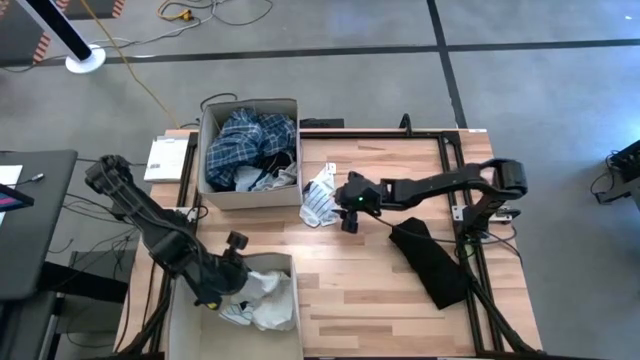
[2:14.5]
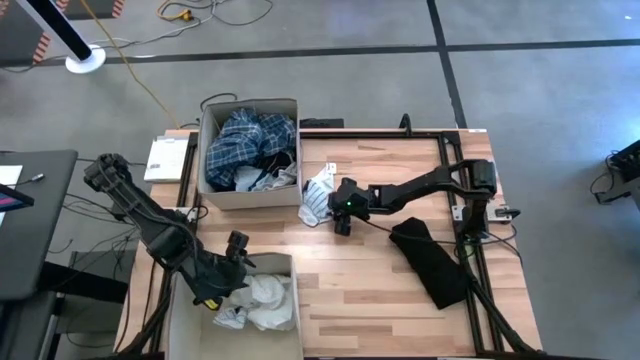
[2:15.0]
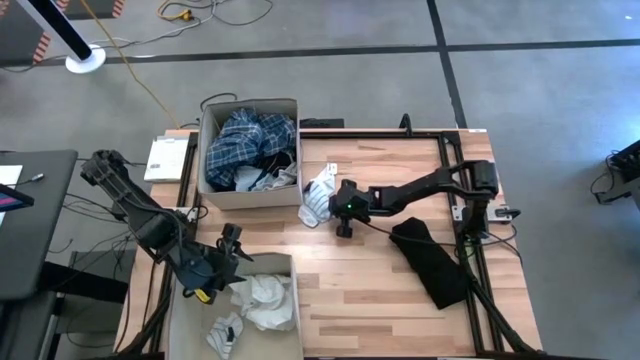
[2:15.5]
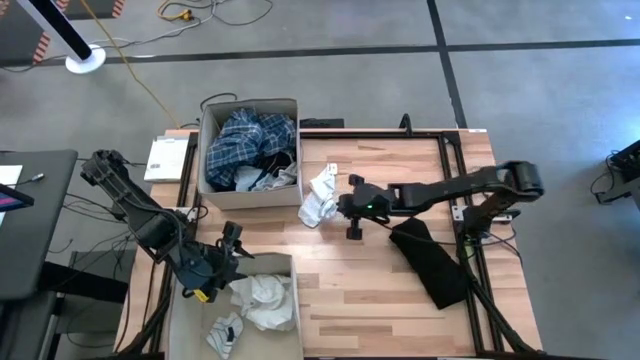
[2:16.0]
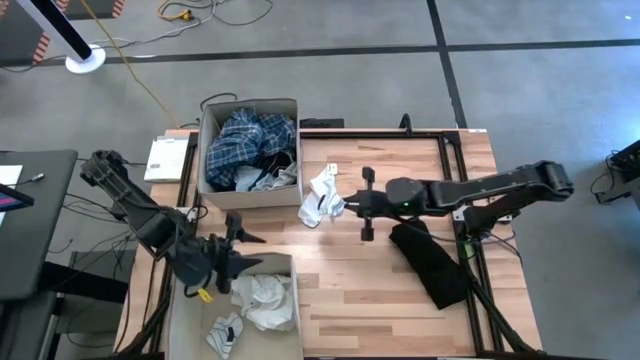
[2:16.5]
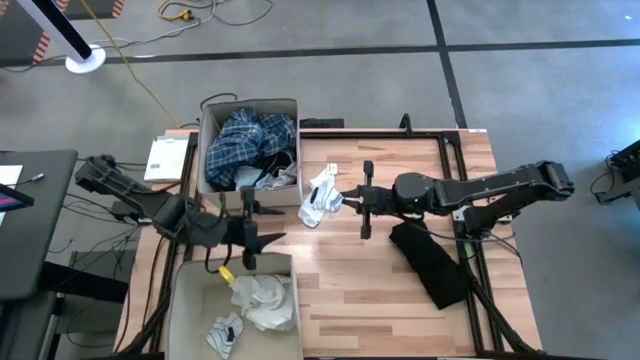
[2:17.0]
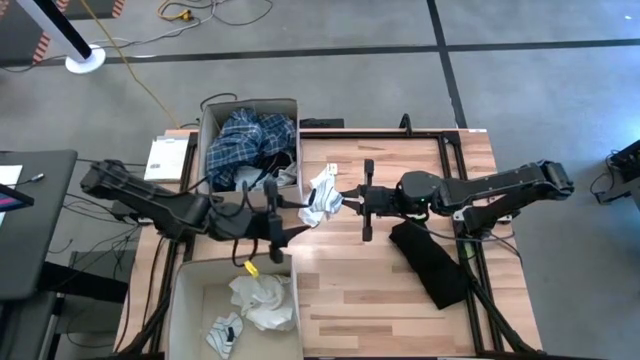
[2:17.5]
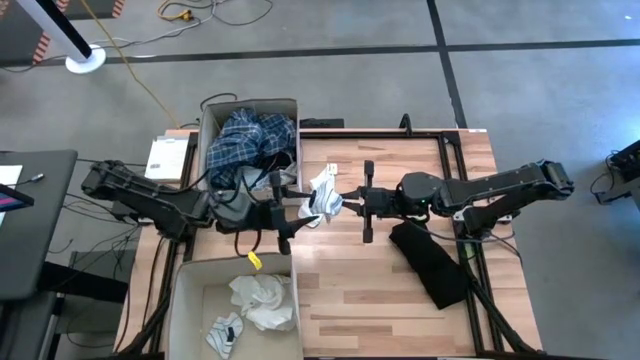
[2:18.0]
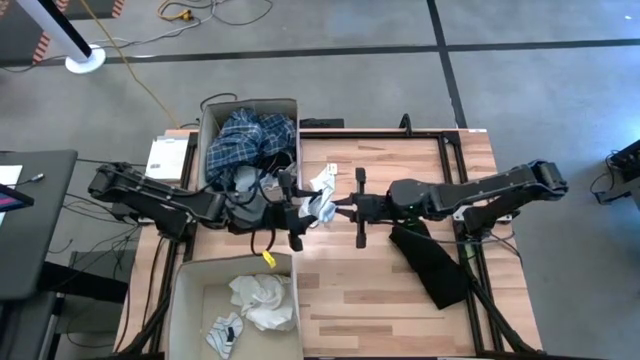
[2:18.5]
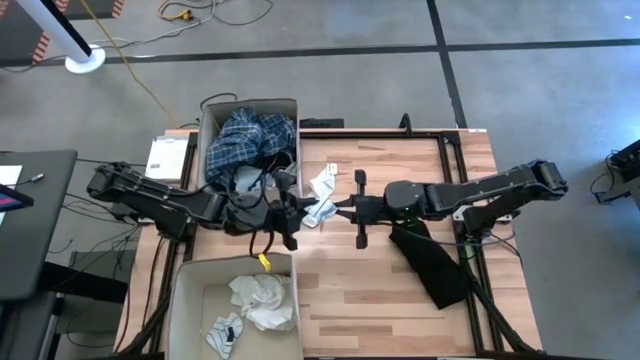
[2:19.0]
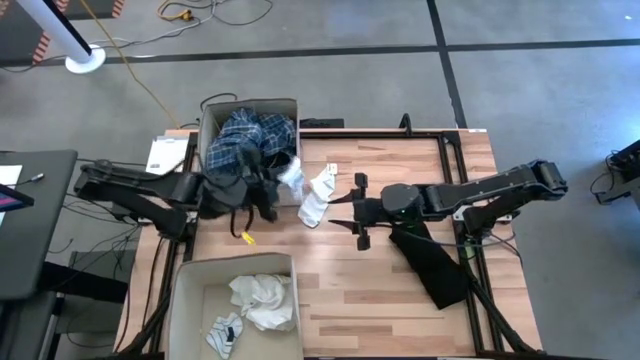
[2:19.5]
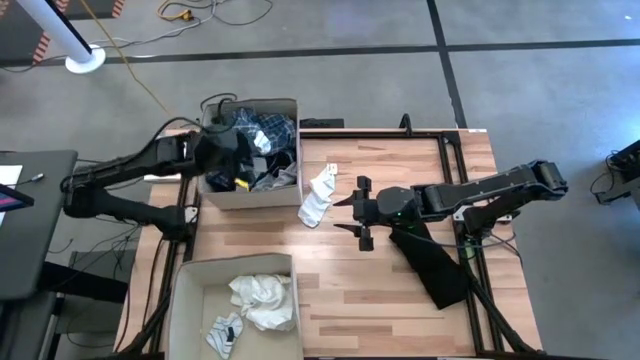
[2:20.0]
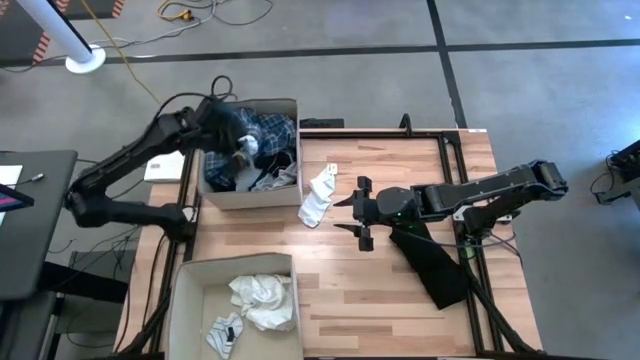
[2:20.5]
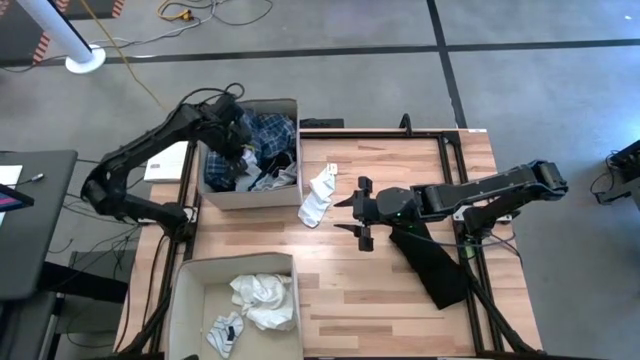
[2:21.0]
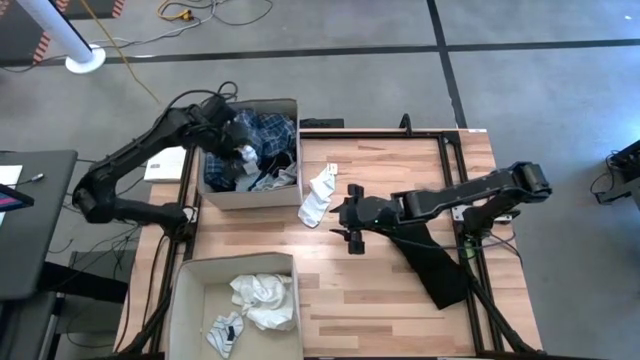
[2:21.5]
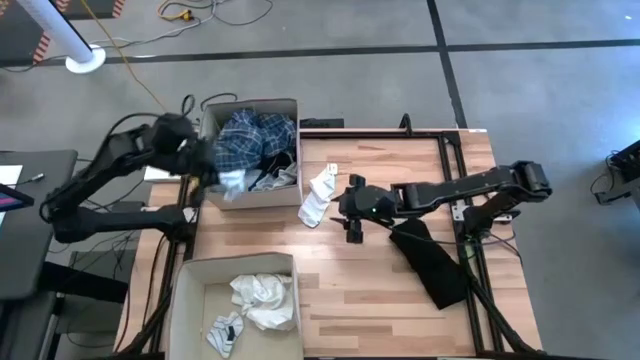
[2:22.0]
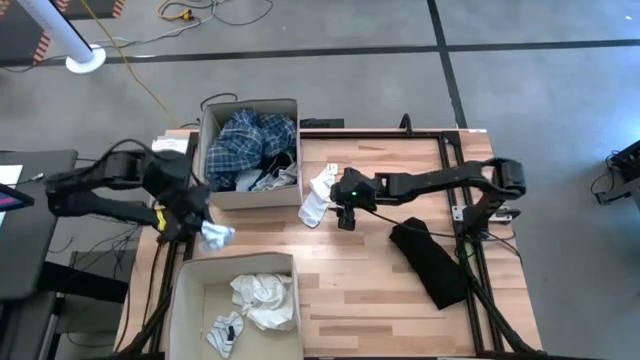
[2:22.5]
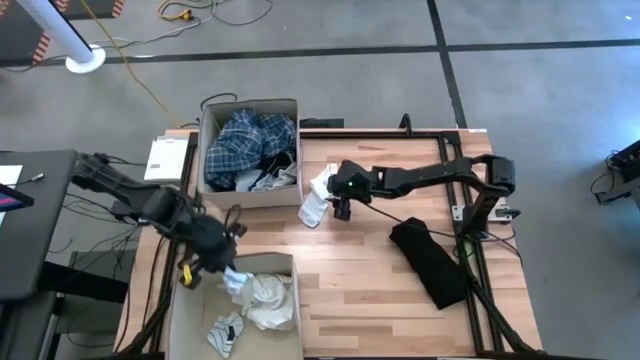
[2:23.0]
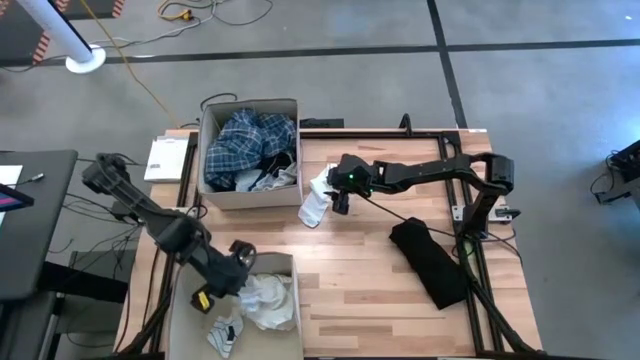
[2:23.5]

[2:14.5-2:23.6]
Task: Sort clothes
Put the white striped sock into the bottom light brown laundry organizer

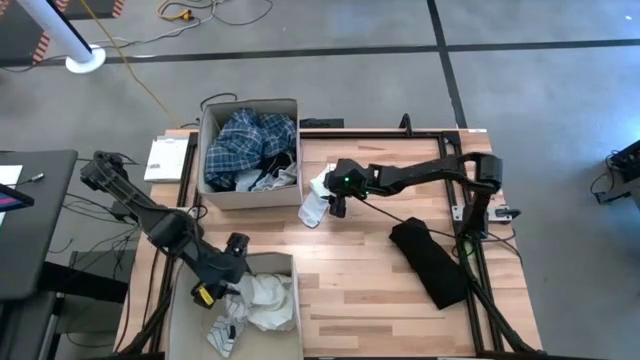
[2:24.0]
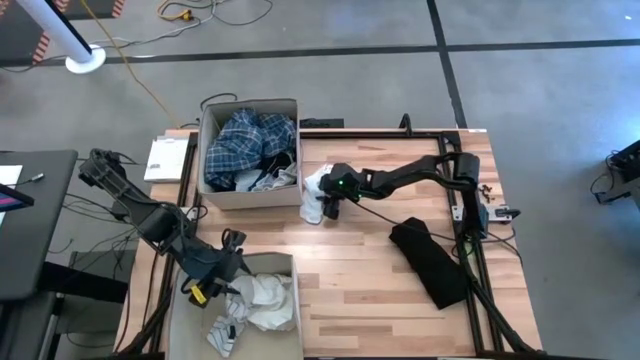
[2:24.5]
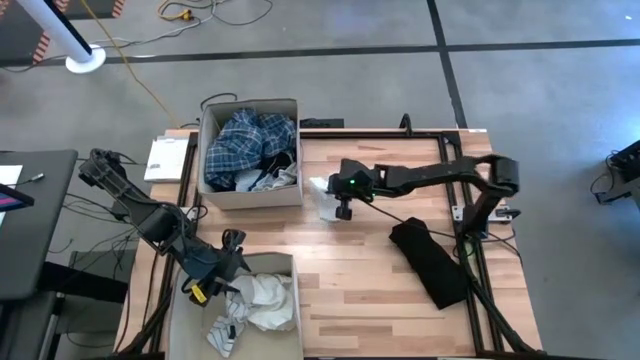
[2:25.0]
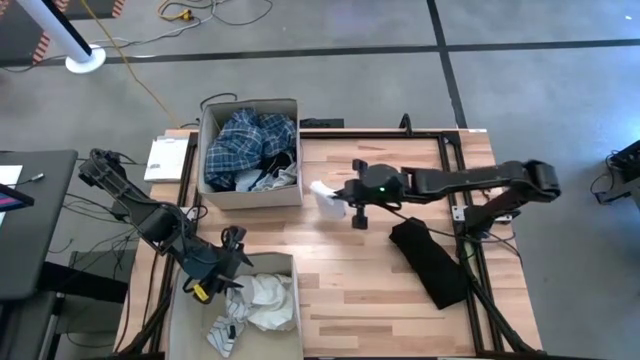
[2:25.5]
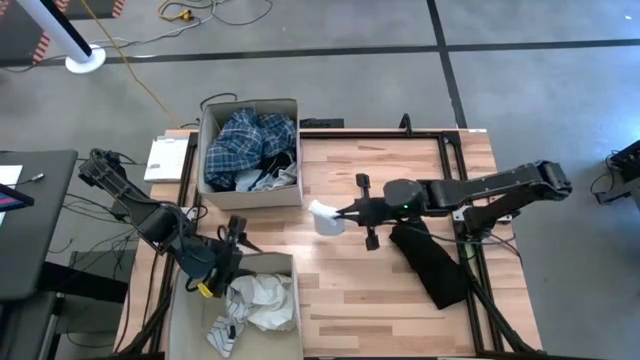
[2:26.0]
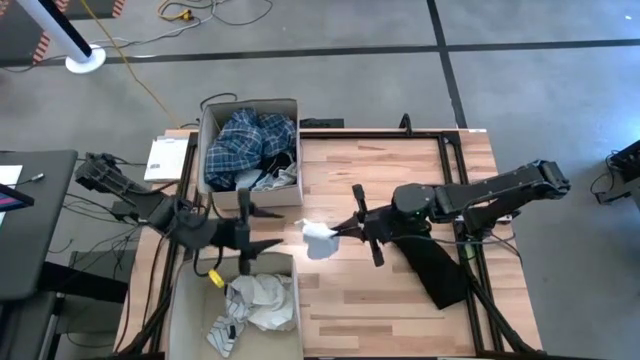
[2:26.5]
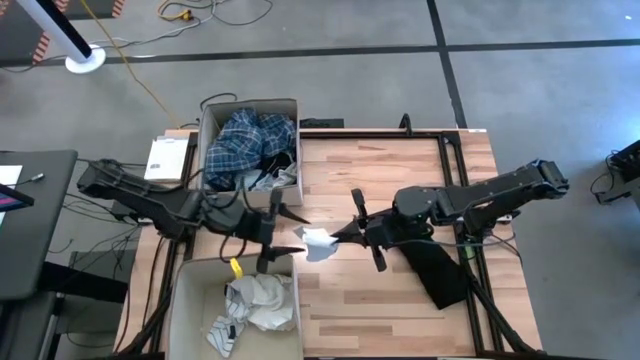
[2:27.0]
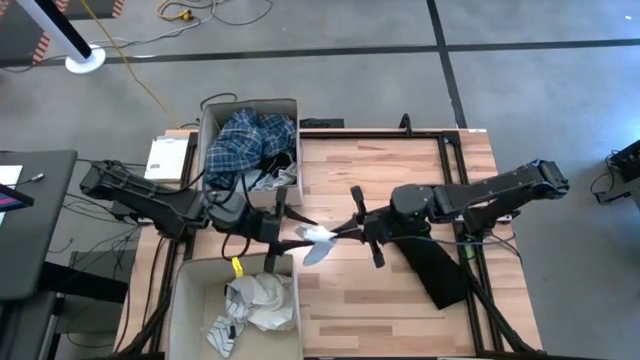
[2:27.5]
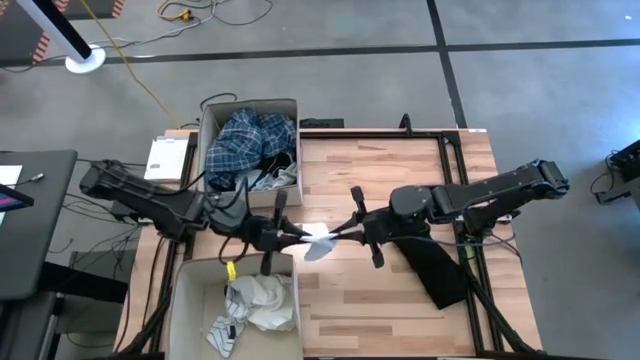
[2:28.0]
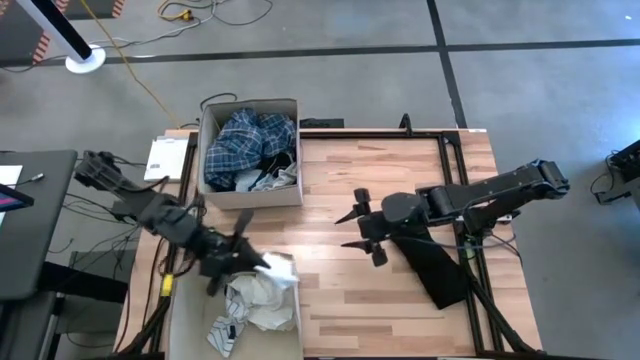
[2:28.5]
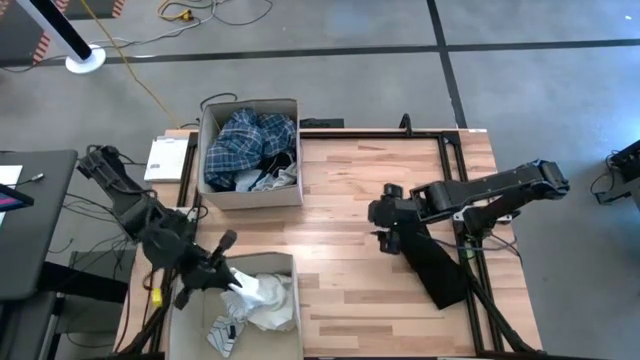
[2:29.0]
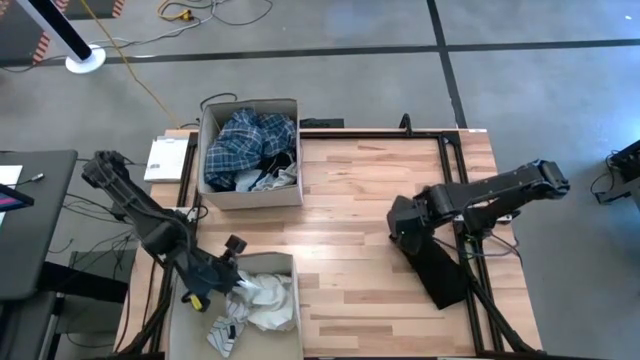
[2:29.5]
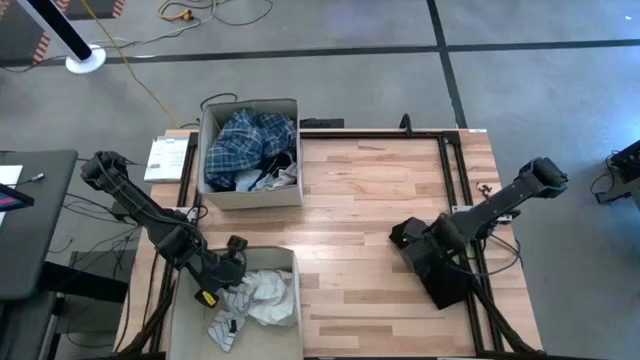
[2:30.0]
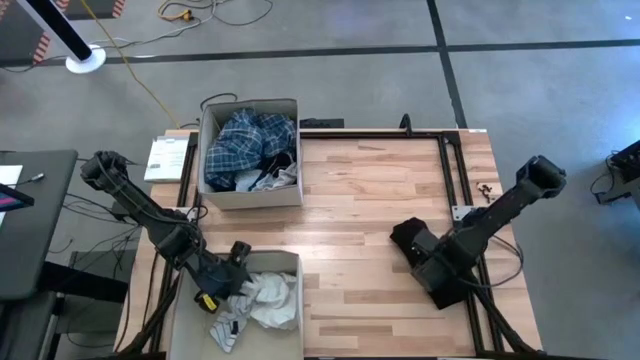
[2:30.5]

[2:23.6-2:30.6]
Put the white sock into the bottom light brown laundry organizer

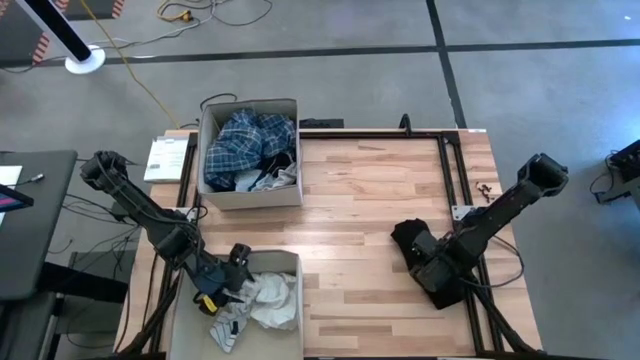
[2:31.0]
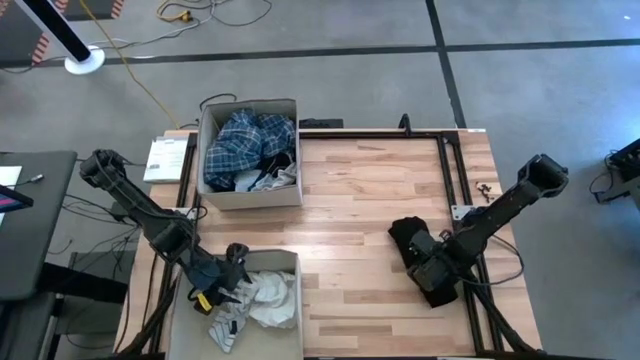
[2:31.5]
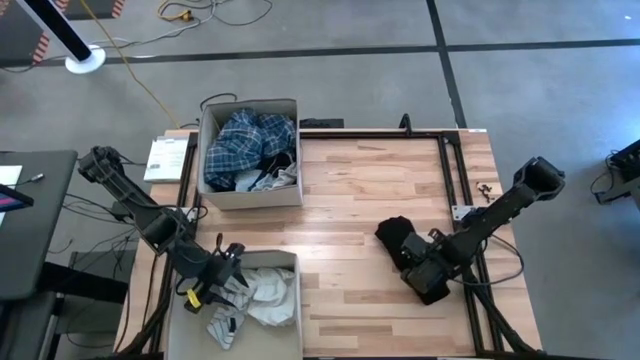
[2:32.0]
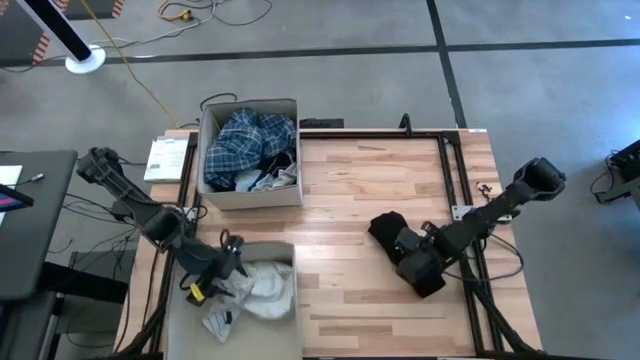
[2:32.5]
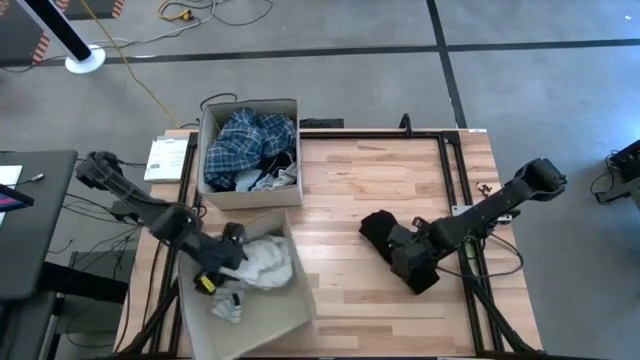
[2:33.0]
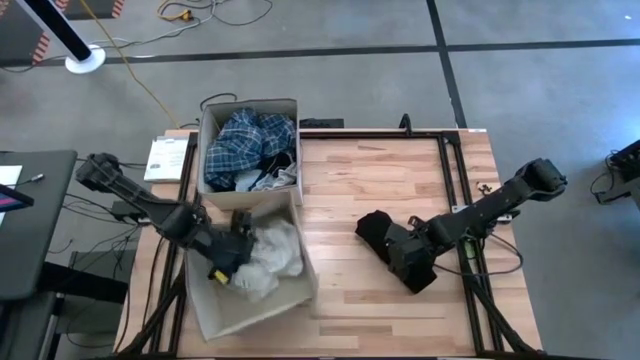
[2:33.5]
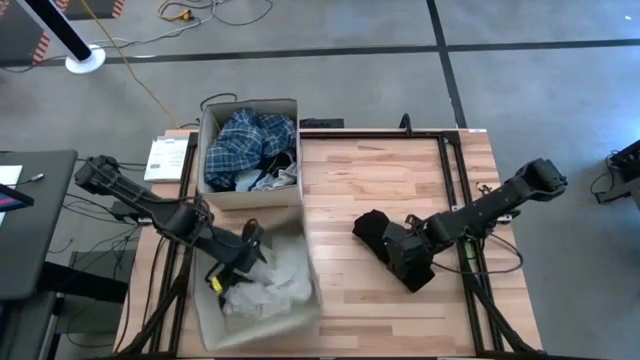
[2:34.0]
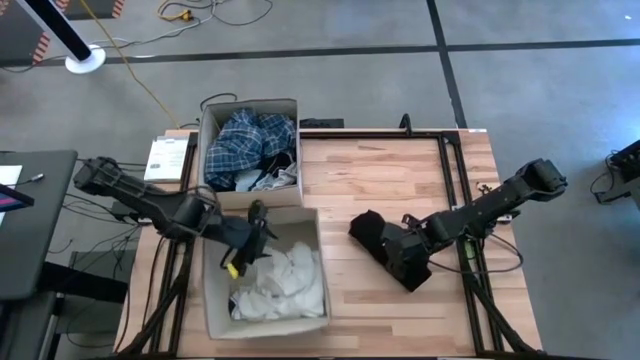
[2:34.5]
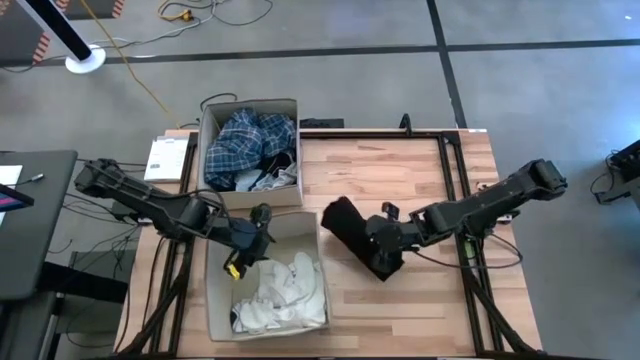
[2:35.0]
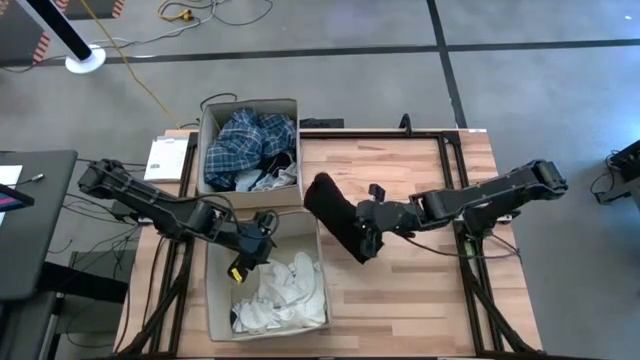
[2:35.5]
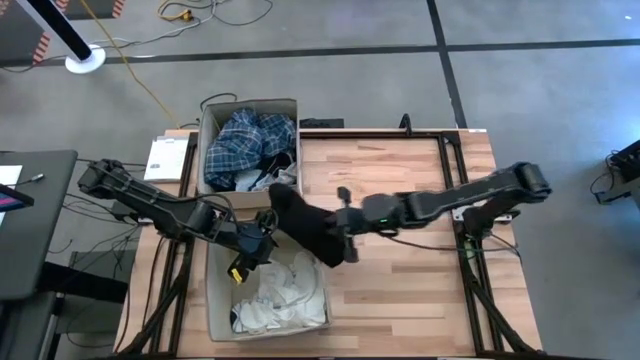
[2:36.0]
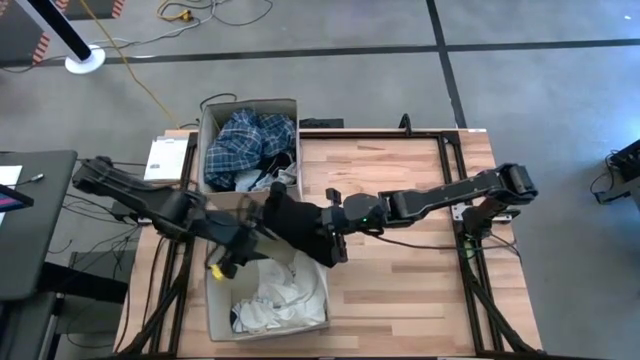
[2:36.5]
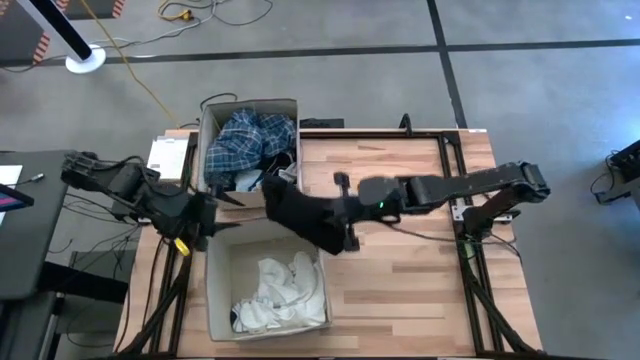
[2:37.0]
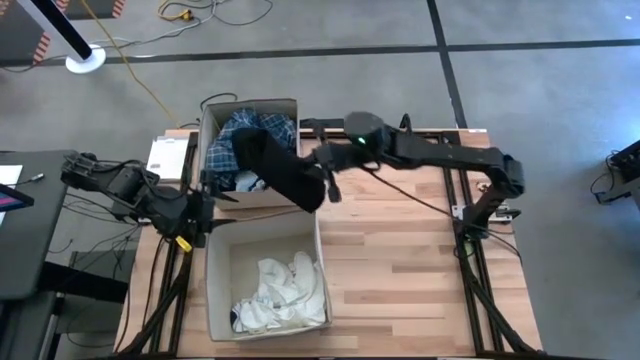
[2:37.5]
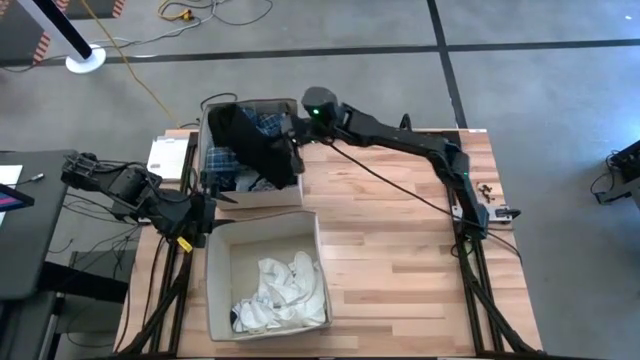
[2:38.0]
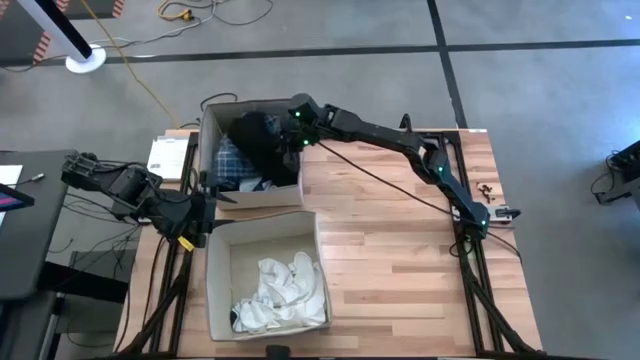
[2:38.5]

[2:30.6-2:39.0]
Put the black shirt into the top light brown laundry organizer
